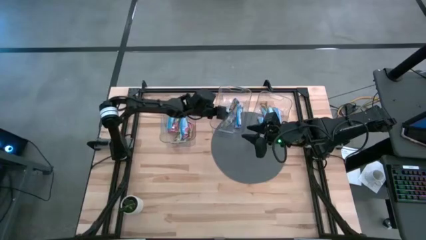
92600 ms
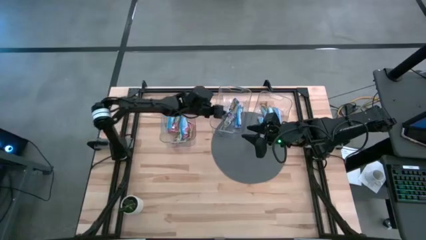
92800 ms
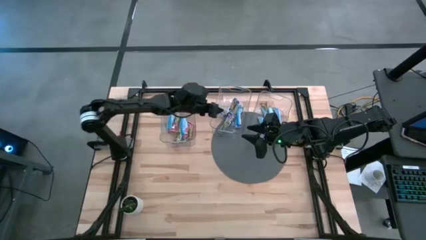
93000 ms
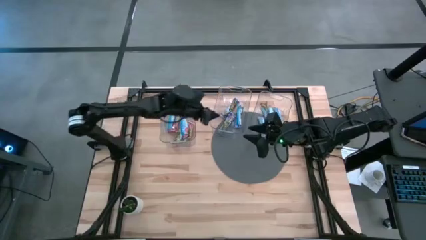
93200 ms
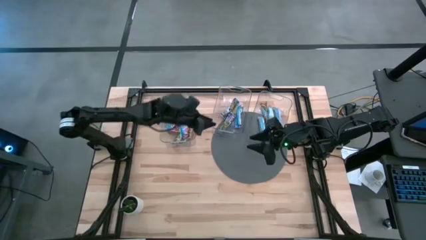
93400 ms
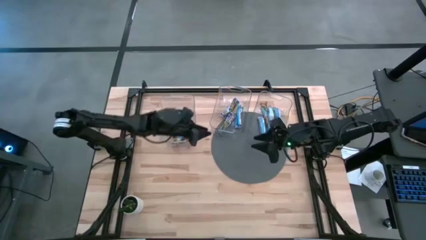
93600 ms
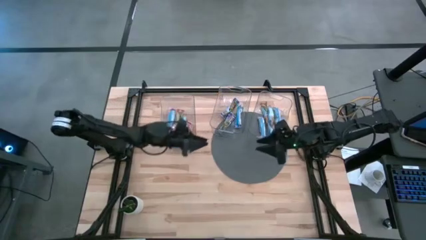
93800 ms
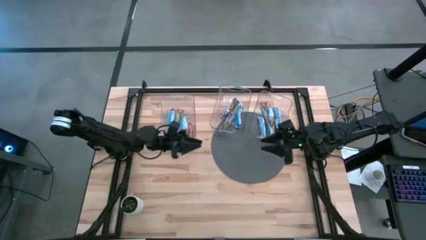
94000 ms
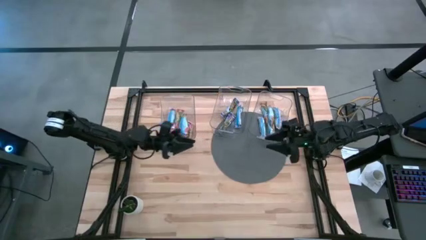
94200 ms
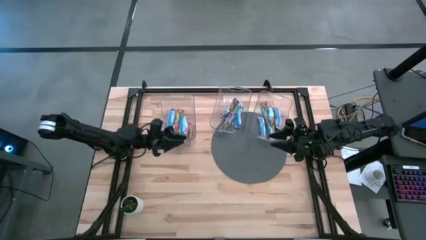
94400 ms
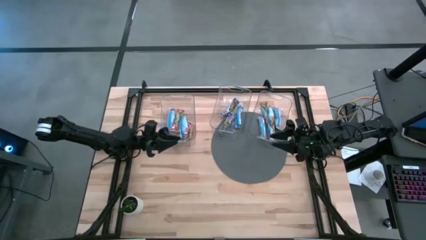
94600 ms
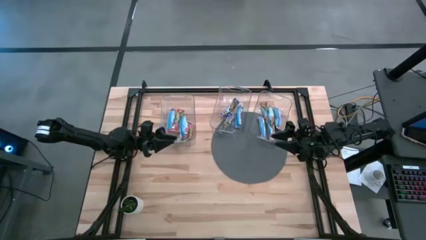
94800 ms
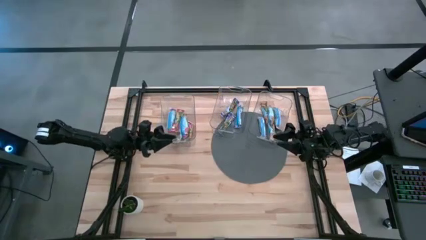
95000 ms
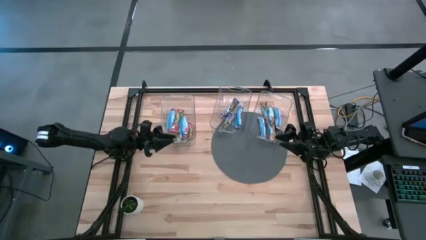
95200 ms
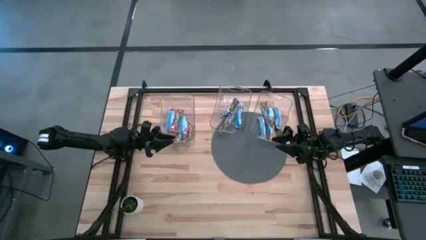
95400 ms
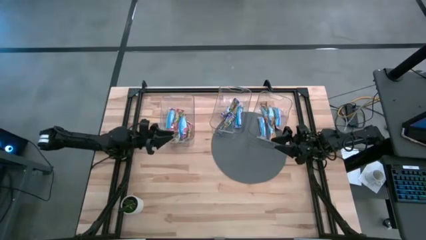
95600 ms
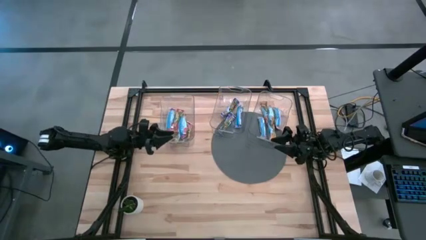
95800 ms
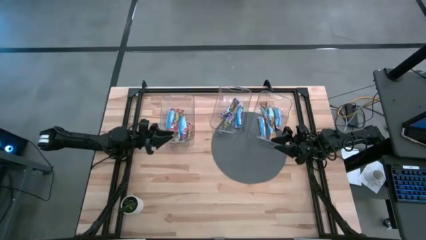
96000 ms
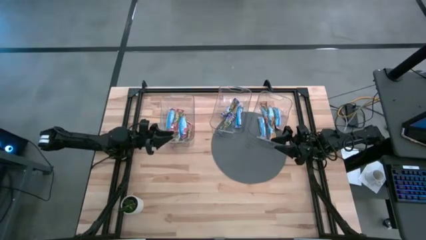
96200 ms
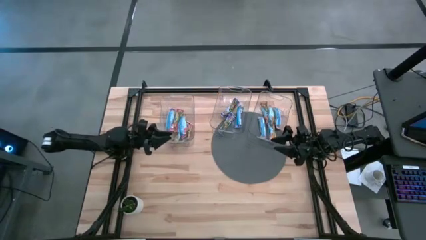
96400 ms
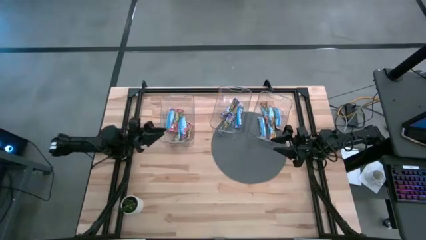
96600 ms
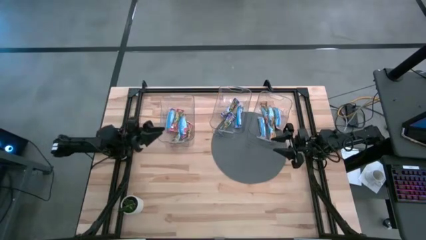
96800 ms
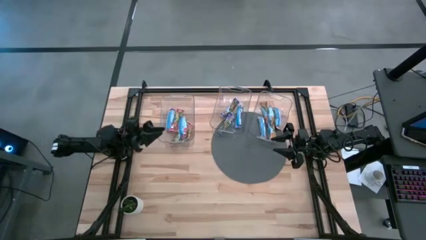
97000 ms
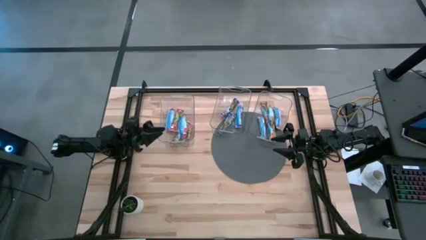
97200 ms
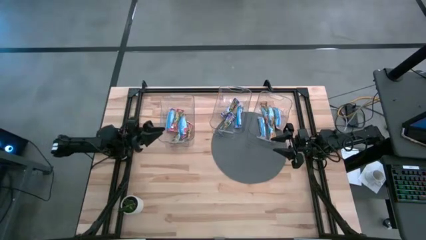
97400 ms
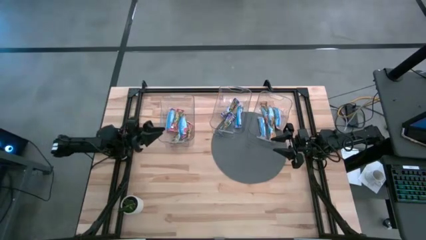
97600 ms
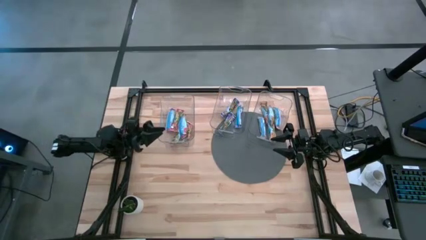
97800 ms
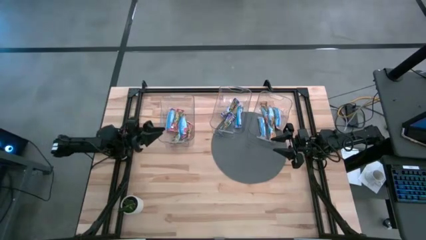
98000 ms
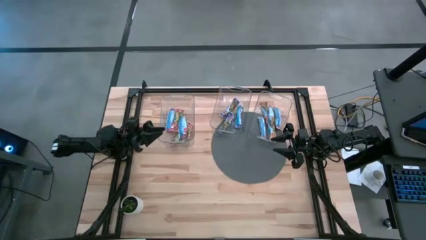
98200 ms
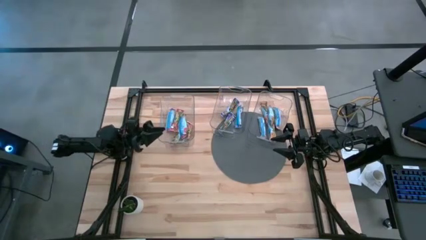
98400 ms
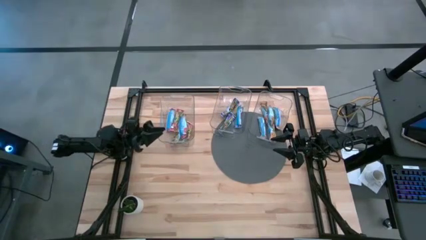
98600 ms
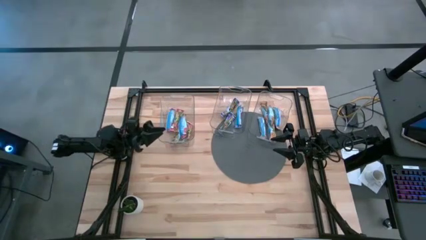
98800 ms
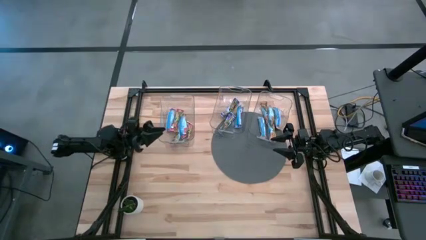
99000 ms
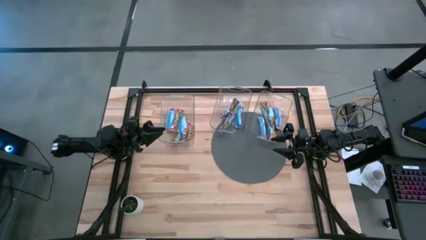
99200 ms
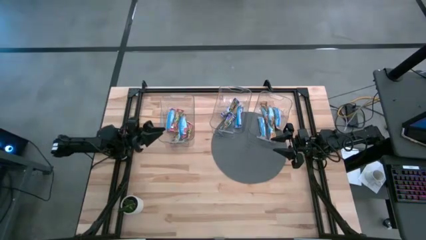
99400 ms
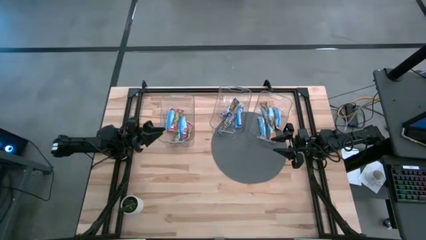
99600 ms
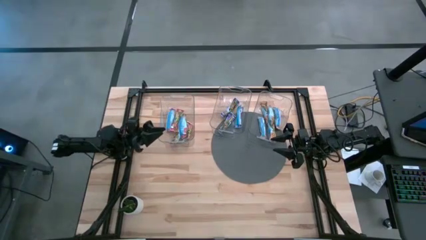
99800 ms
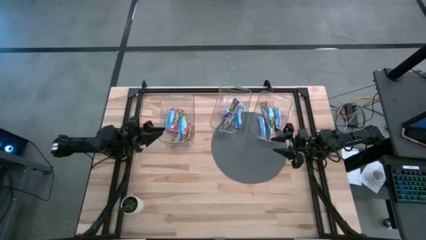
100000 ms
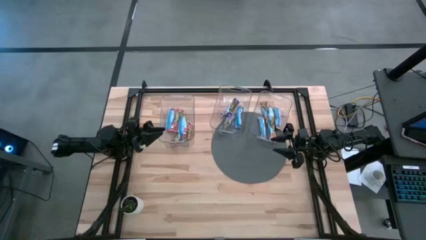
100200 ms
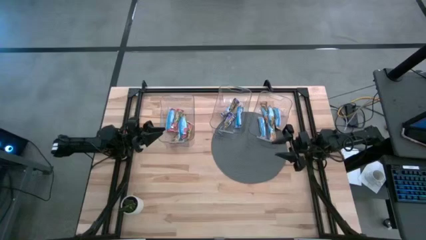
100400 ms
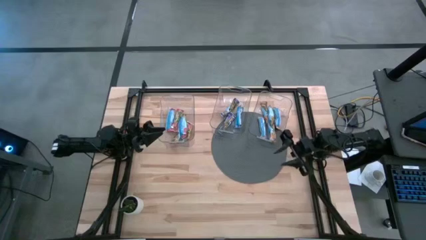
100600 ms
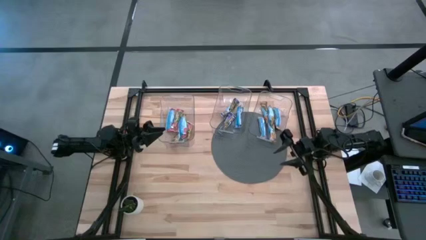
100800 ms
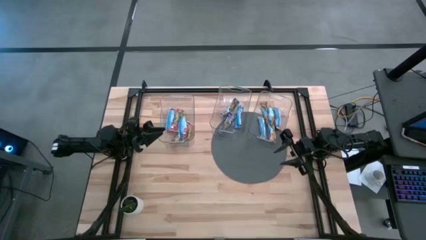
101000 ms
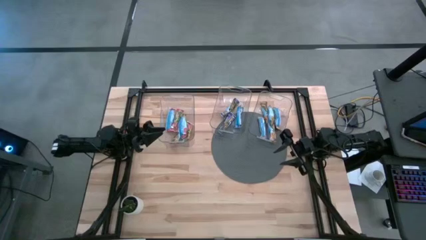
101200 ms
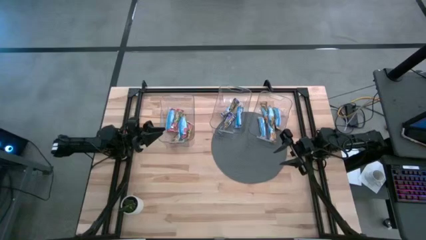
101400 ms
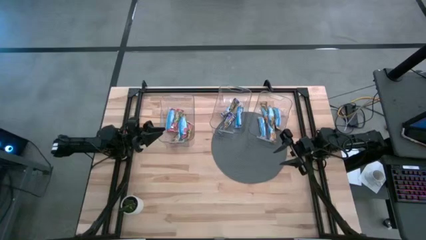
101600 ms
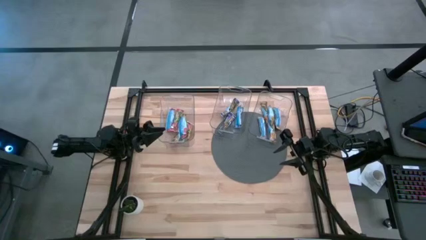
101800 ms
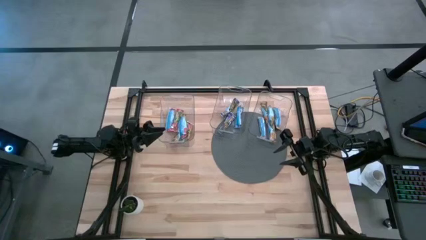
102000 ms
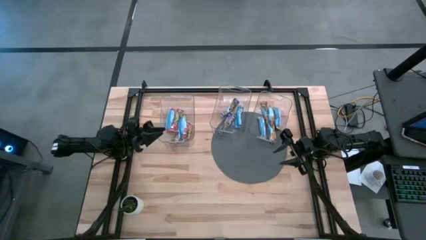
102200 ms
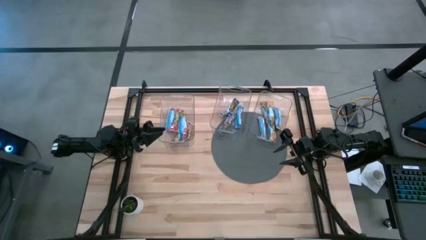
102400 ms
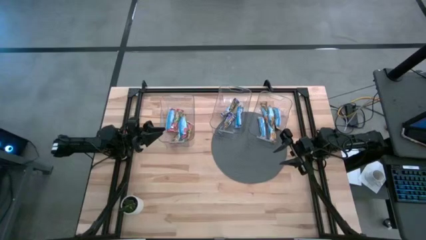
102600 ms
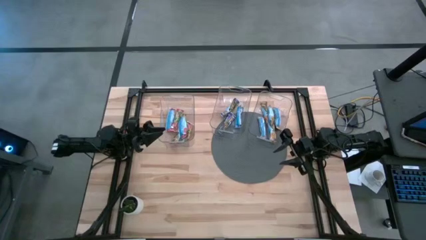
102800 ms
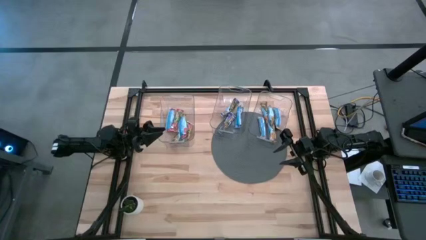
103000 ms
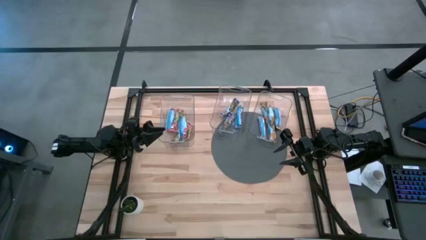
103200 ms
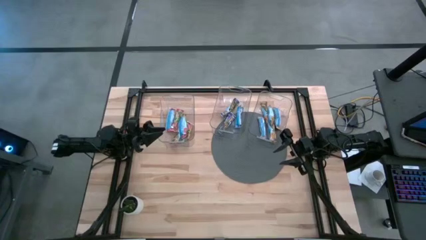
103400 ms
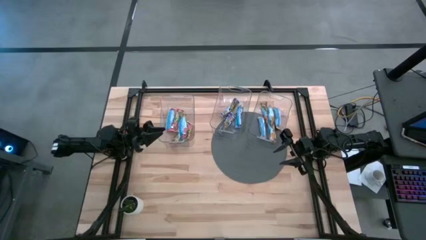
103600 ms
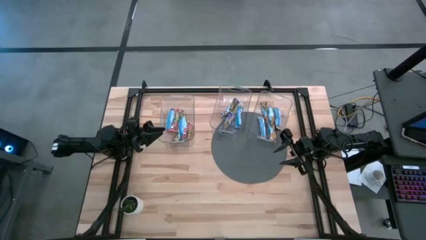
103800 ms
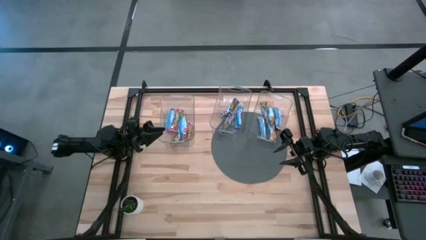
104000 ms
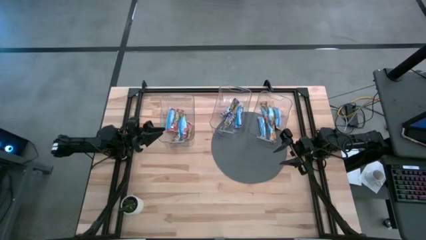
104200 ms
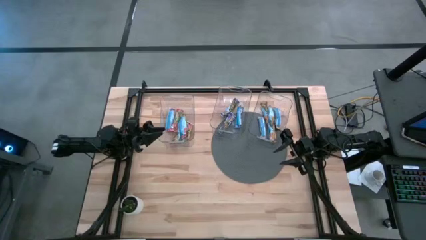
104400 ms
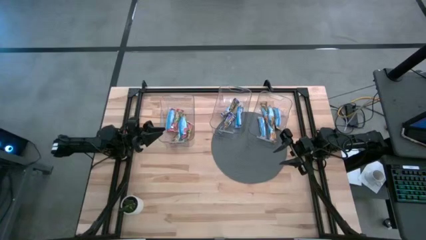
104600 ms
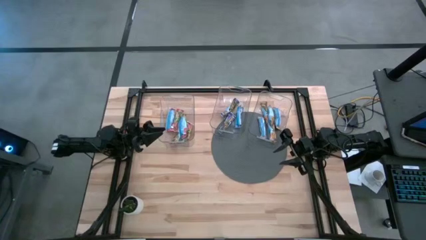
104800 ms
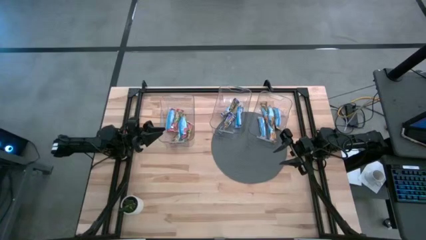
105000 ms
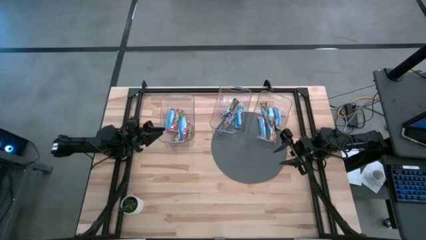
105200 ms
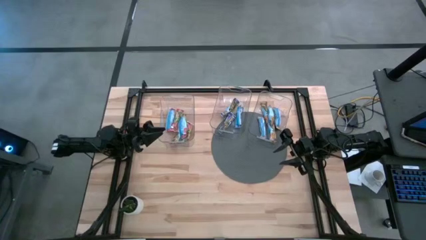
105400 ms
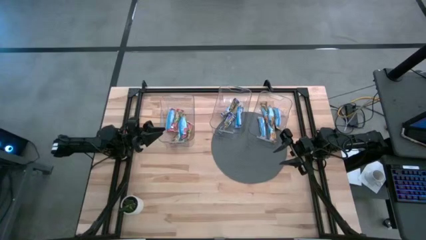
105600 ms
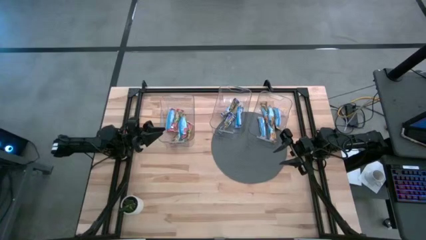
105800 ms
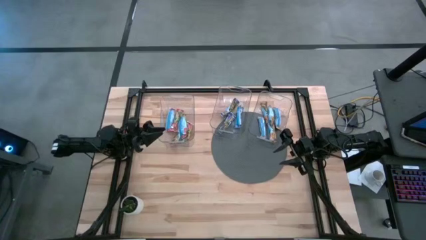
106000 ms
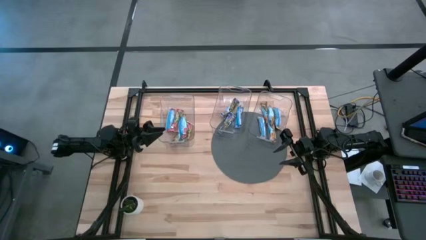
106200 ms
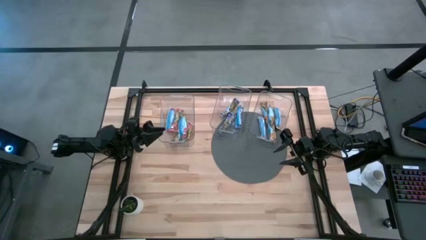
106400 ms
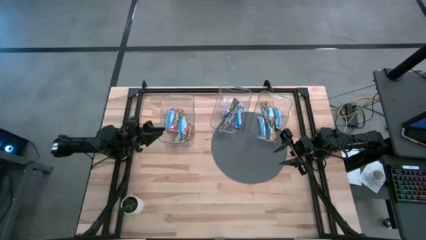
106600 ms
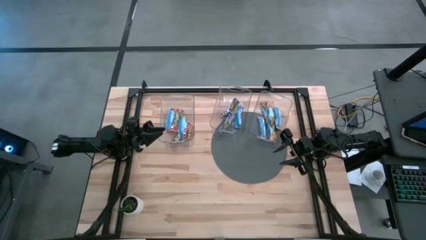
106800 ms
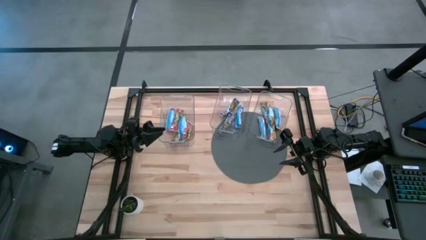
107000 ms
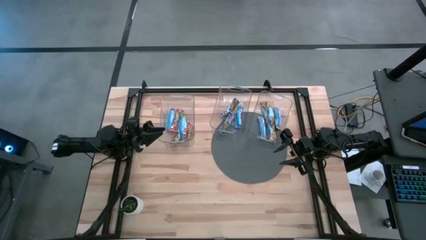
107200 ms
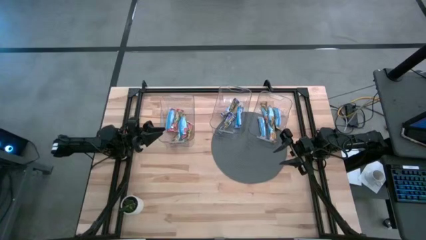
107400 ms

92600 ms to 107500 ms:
Task: Pick and place Granola Bars by type
Return to Home Position
